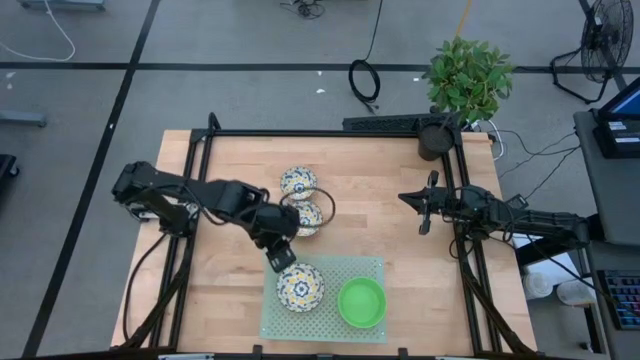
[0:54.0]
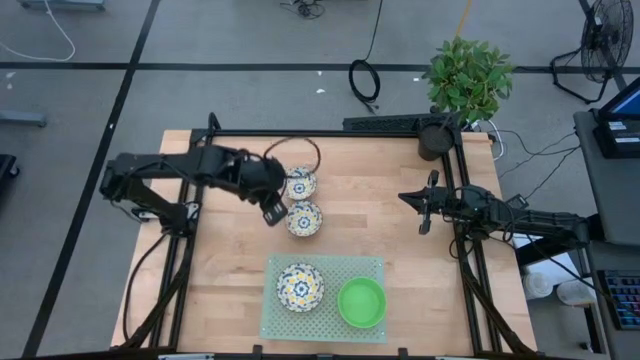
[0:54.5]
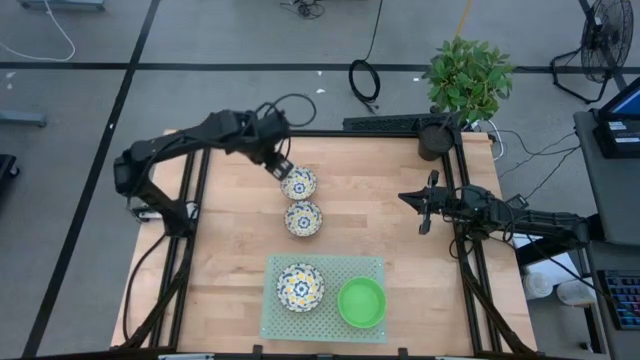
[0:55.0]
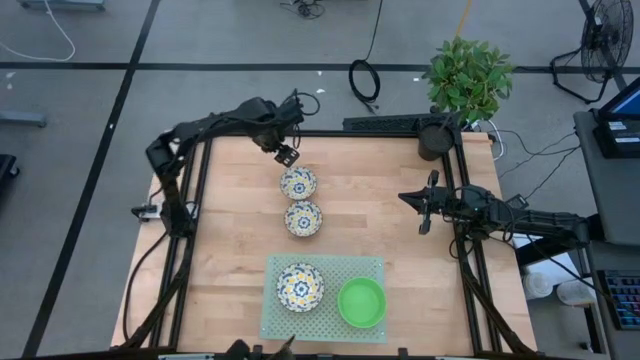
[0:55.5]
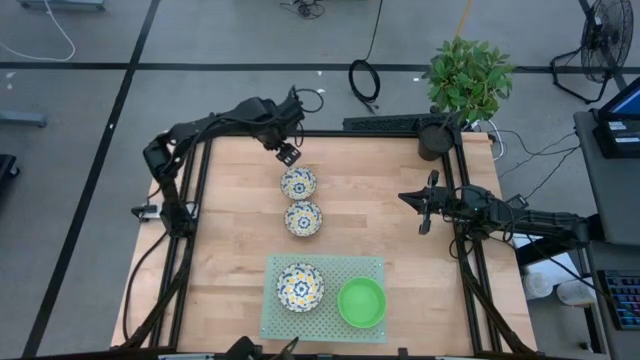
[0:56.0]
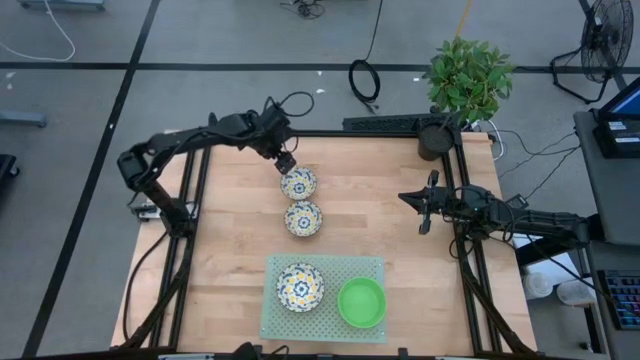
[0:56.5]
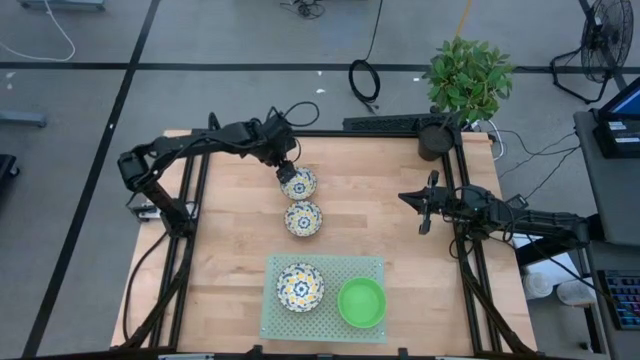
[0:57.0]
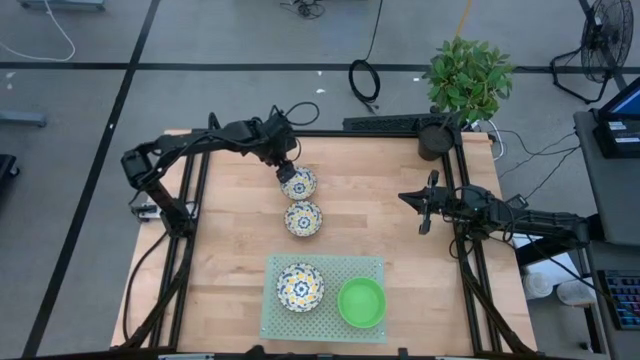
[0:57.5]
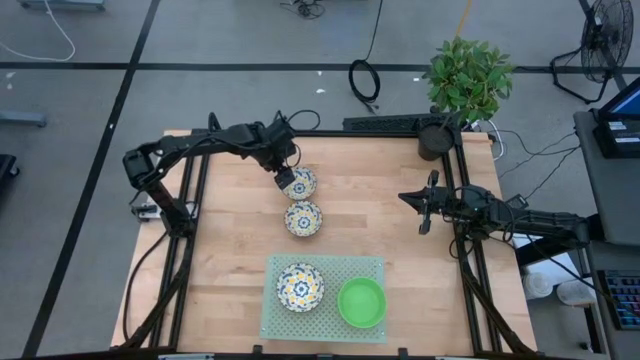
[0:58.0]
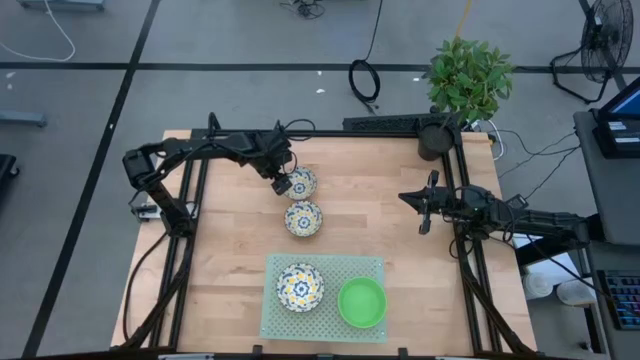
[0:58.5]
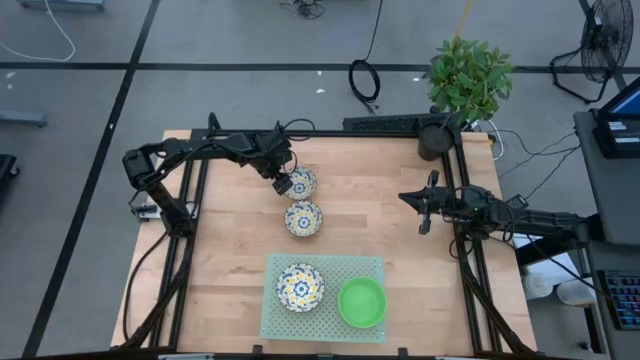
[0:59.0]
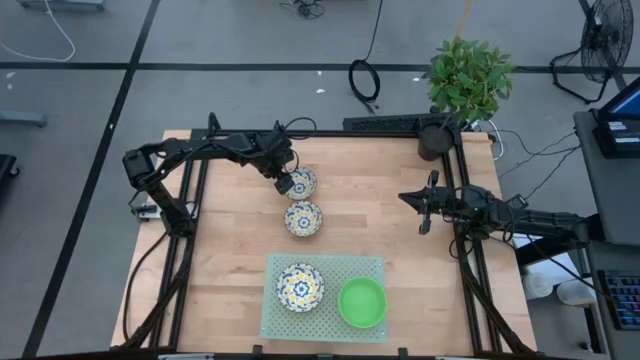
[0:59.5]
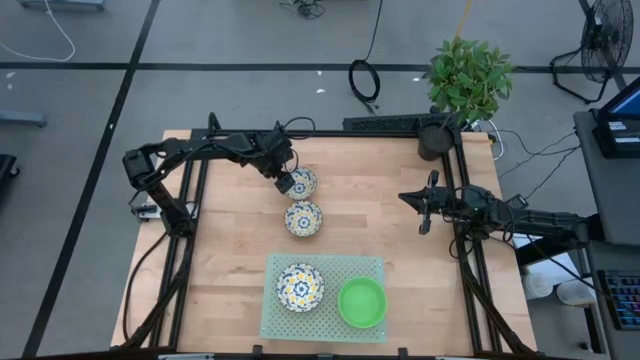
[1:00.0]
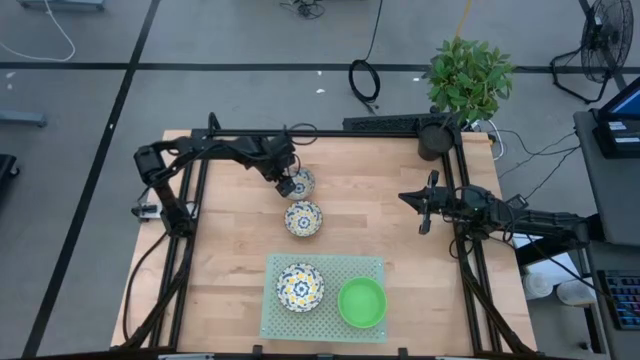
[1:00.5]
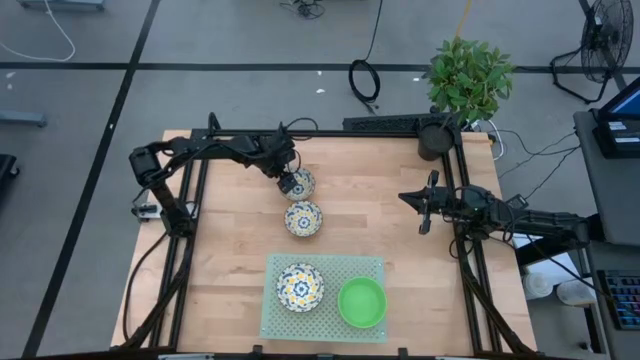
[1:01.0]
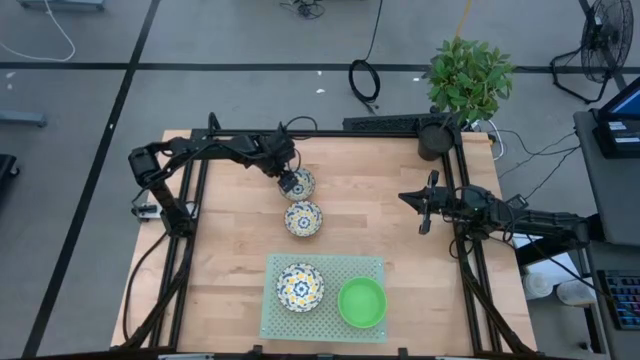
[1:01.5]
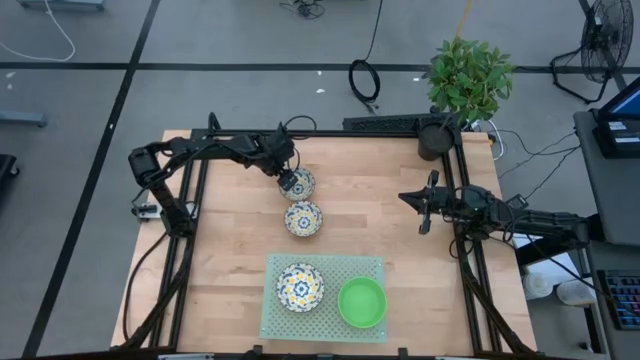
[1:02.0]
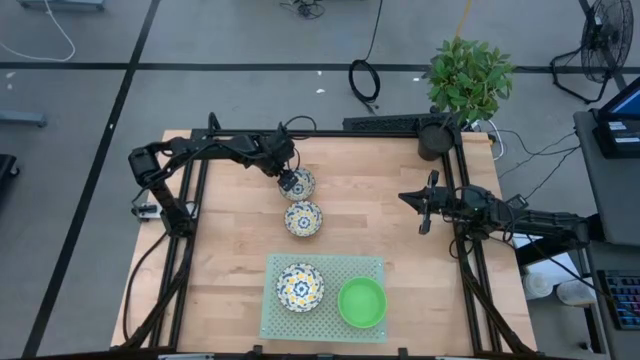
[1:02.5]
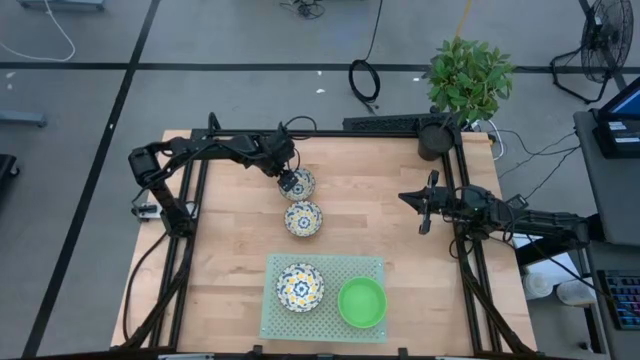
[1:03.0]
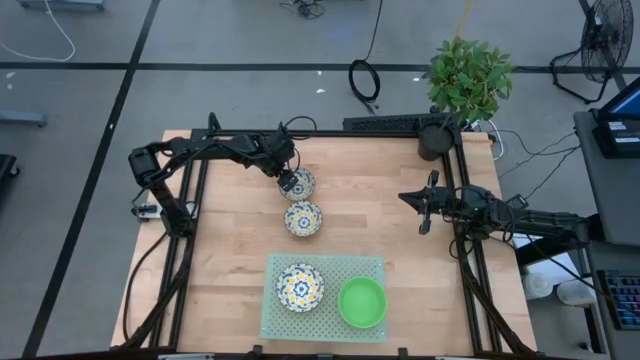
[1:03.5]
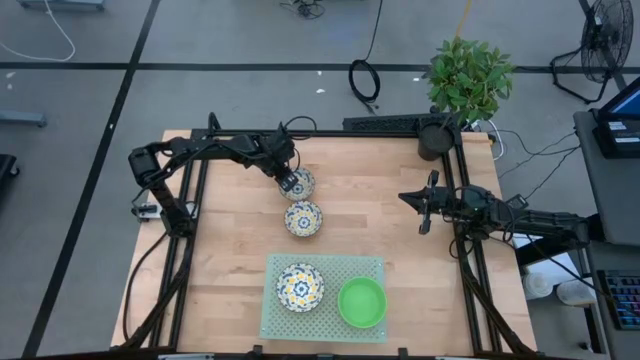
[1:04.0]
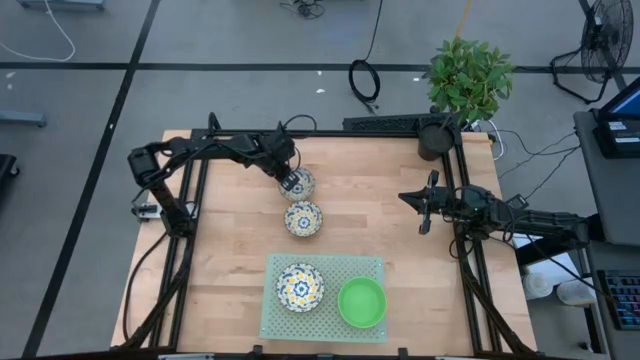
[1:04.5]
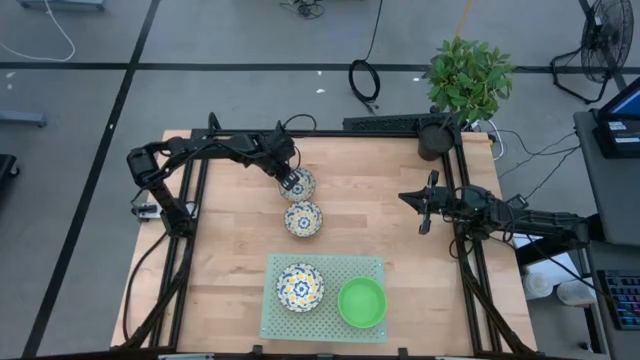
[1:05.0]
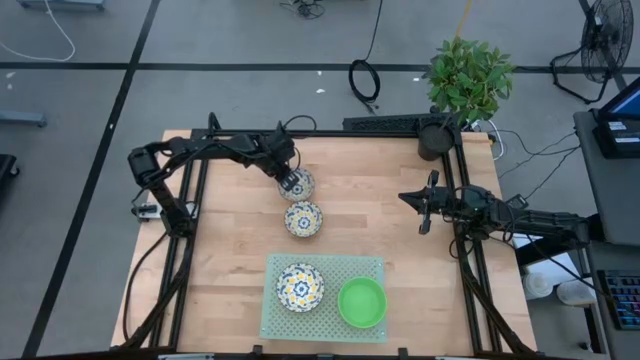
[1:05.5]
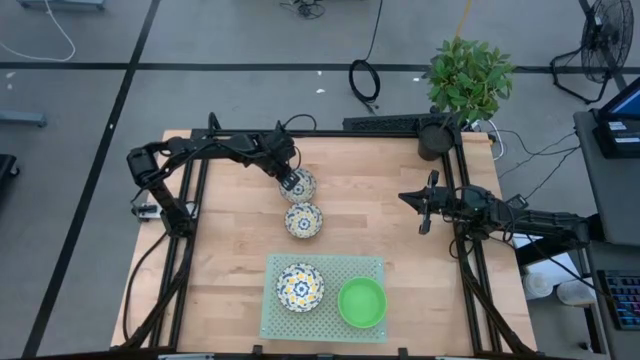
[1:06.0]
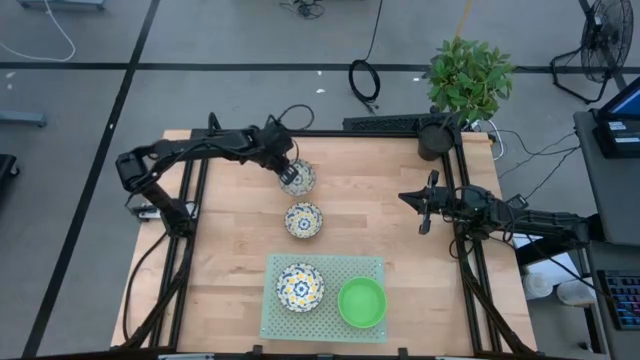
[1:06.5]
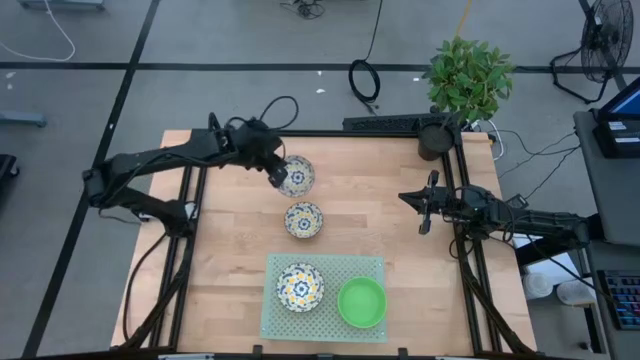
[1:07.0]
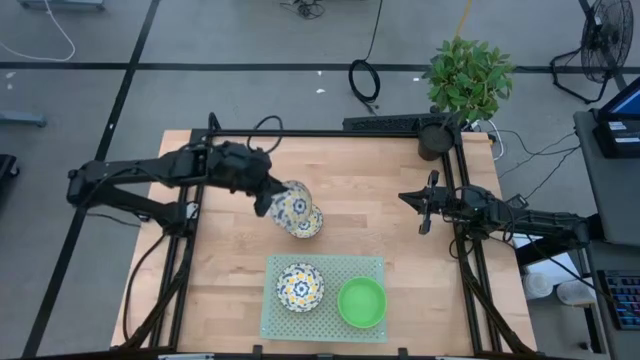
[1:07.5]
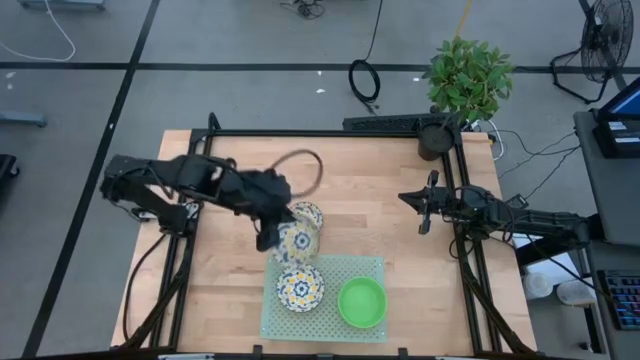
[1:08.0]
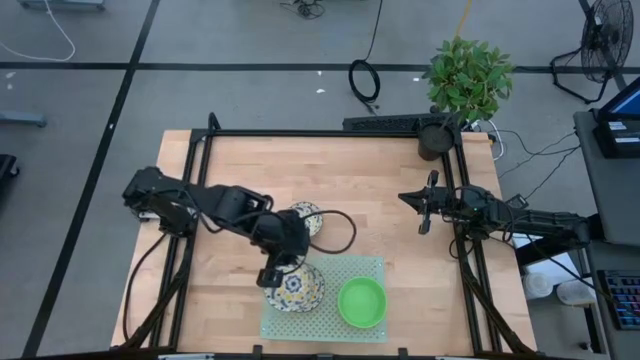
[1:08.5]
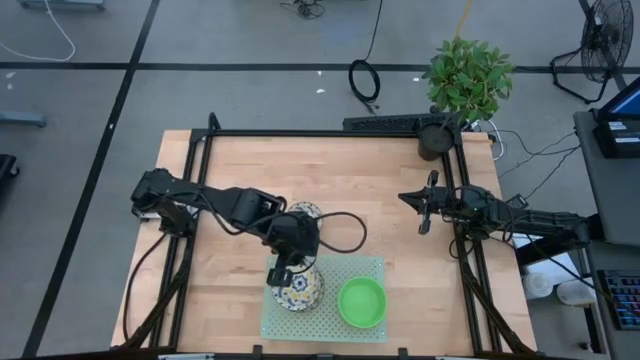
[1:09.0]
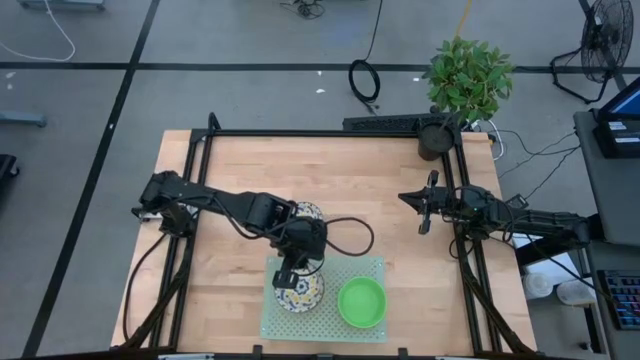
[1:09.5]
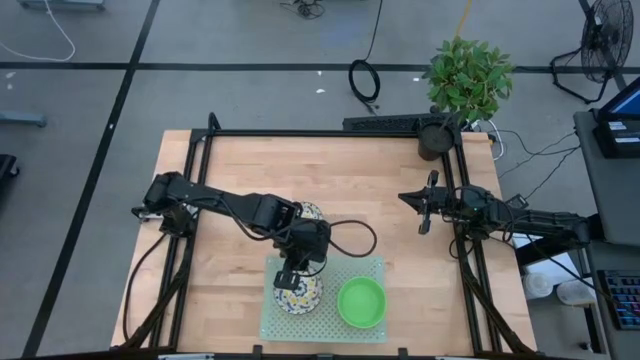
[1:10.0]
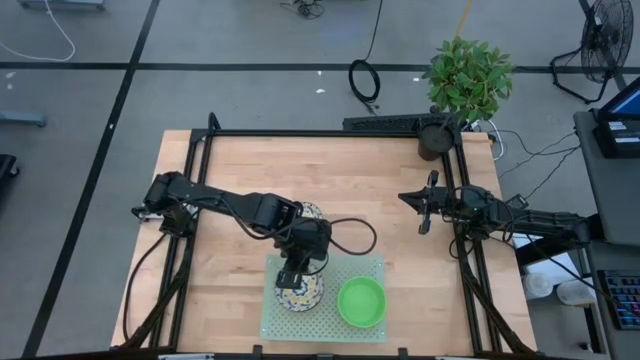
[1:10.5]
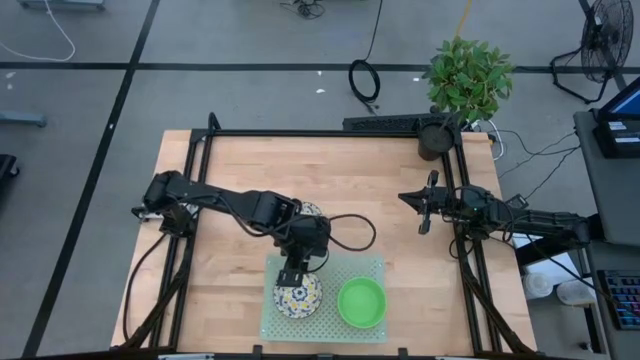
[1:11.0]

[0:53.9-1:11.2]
Task: Pick & Place Mini bowls
Stack the top yellow patterned bowl on the yellow patterned bowl on the shelf
